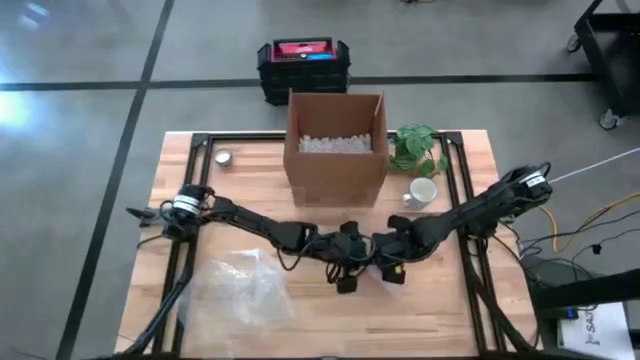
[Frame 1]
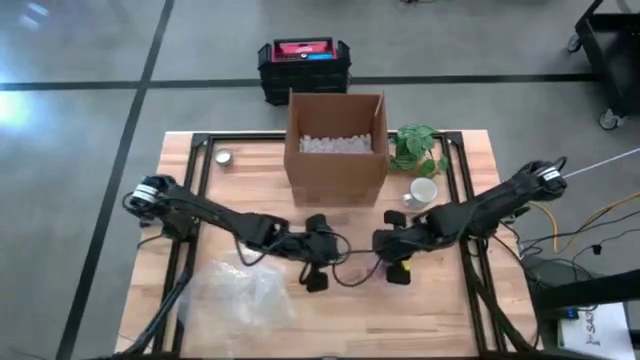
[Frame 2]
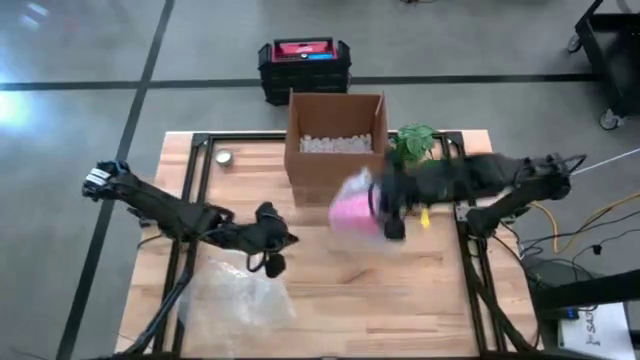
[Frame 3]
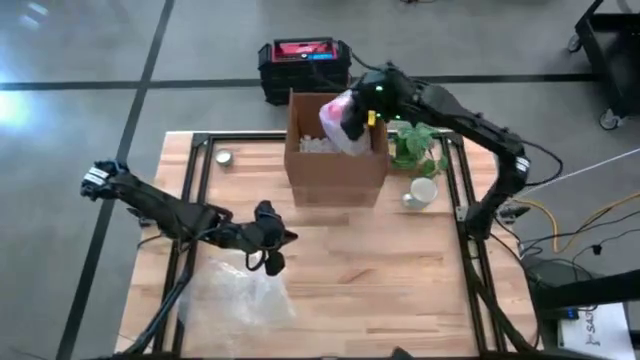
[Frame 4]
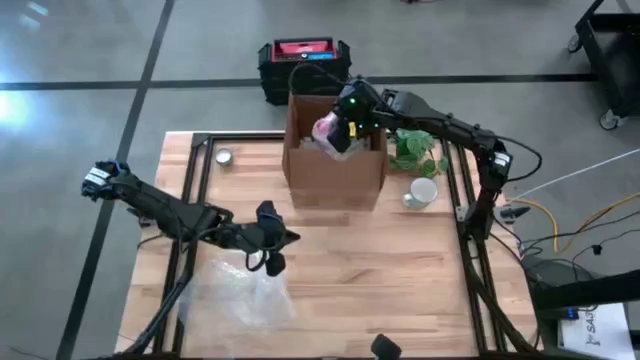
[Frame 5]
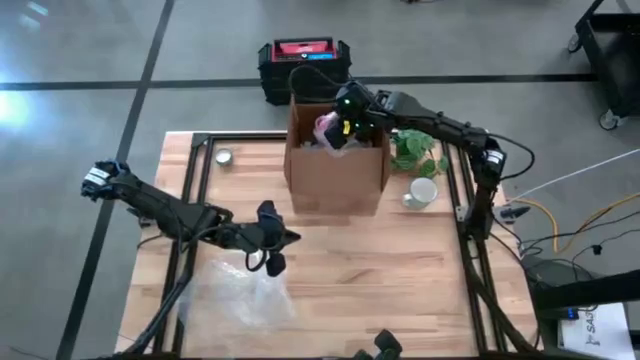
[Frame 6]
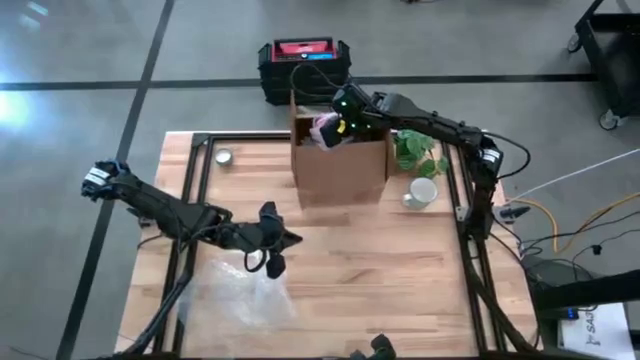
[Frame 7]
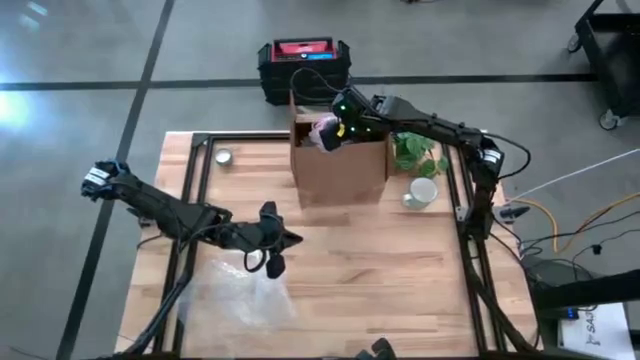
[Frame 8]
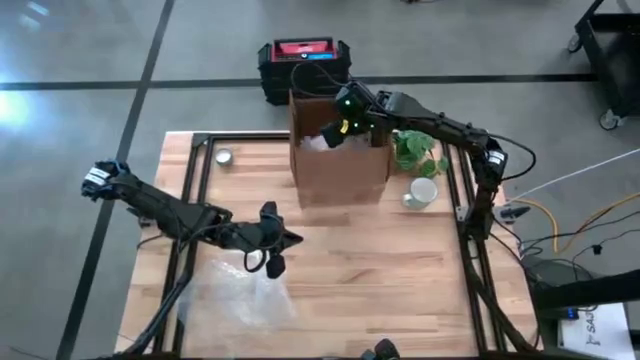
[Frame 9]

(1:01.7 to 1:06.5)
Task: wrap mug
Put the wrapped orange mug into the brown cardboard box

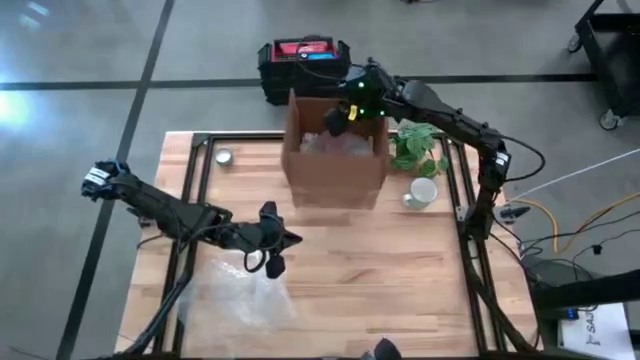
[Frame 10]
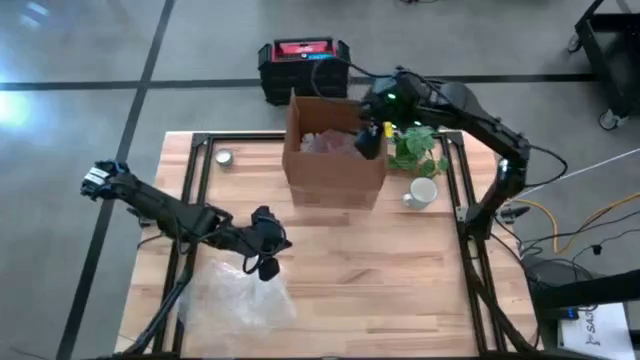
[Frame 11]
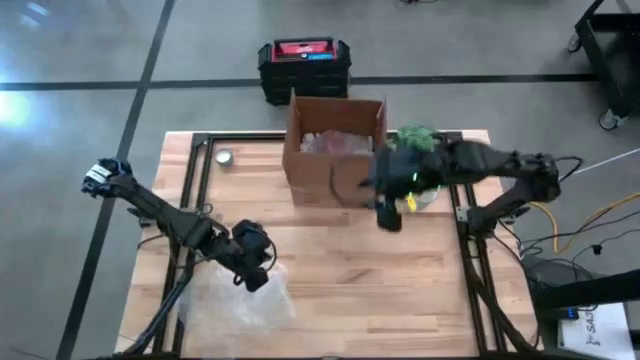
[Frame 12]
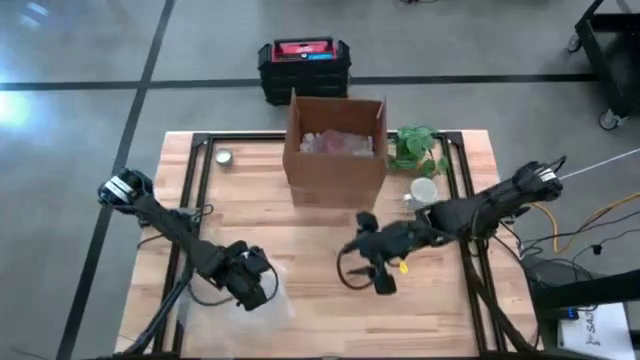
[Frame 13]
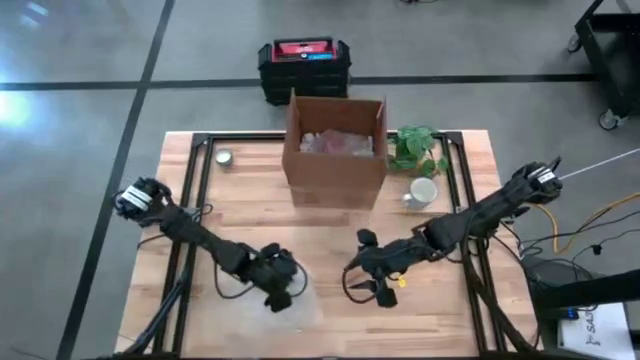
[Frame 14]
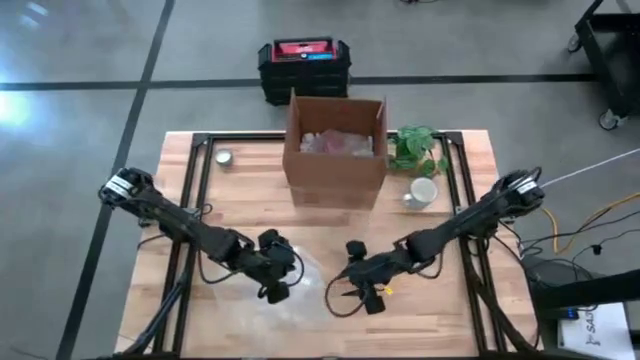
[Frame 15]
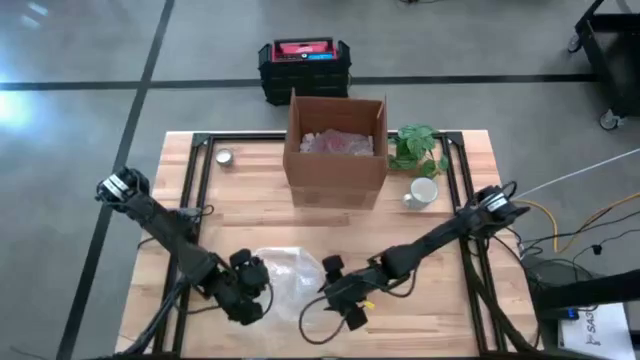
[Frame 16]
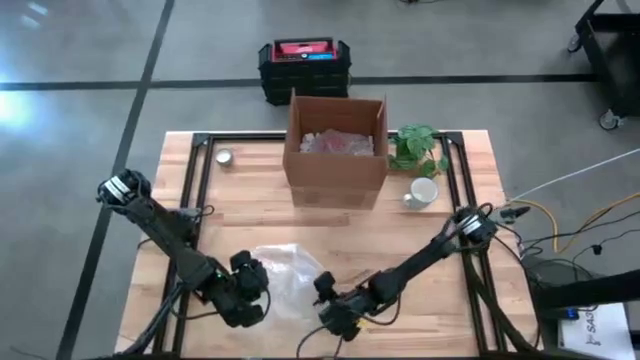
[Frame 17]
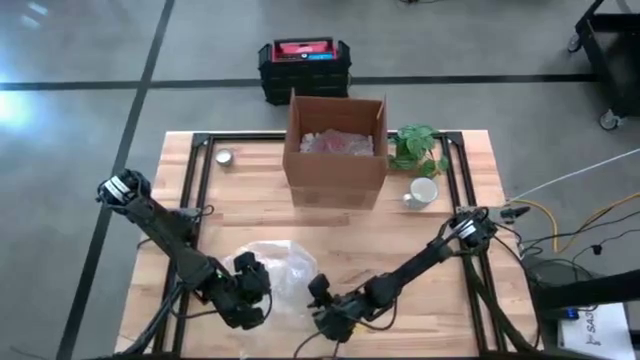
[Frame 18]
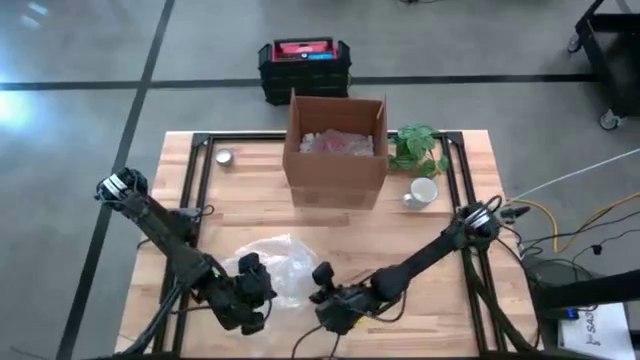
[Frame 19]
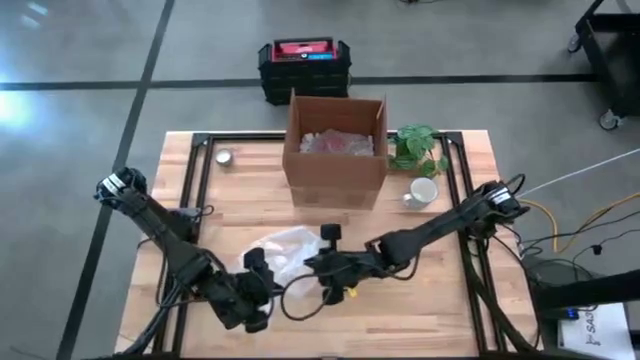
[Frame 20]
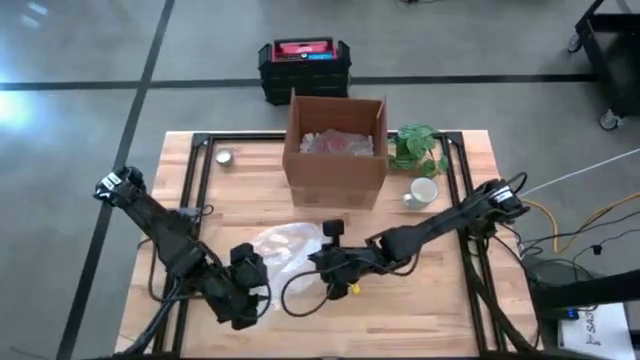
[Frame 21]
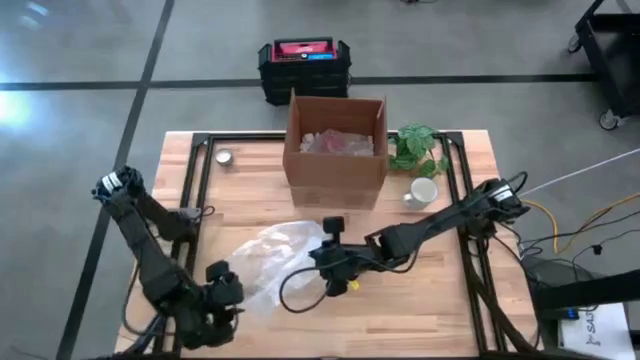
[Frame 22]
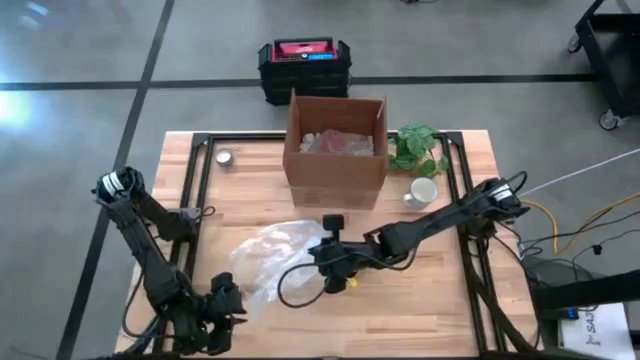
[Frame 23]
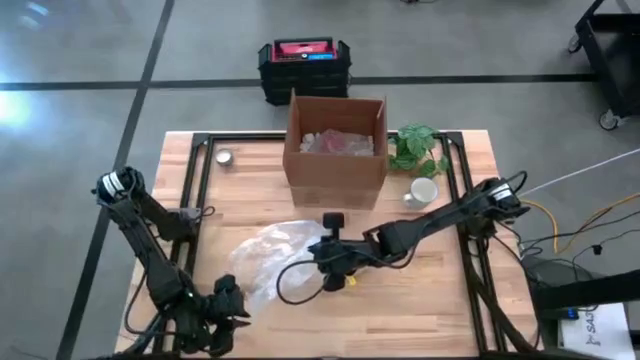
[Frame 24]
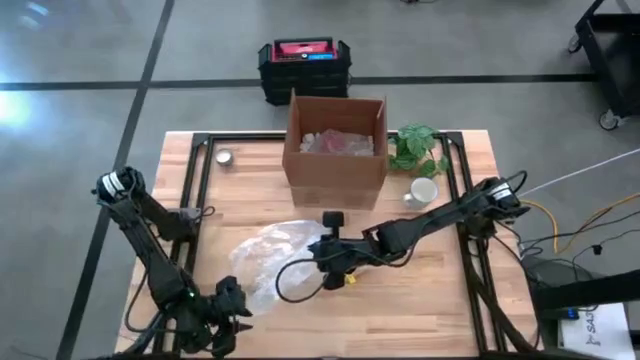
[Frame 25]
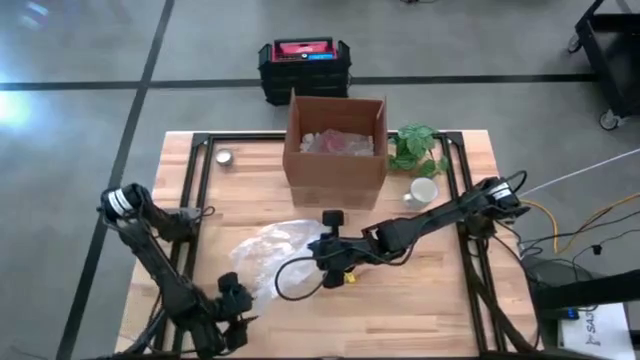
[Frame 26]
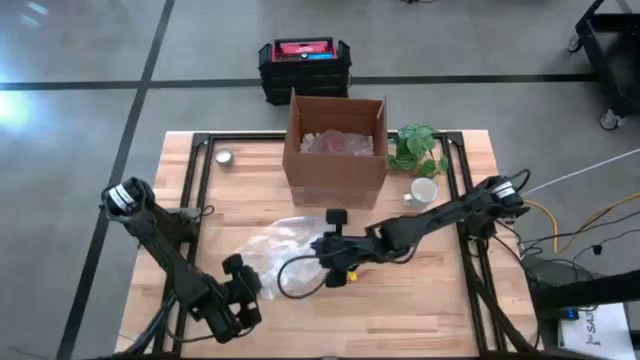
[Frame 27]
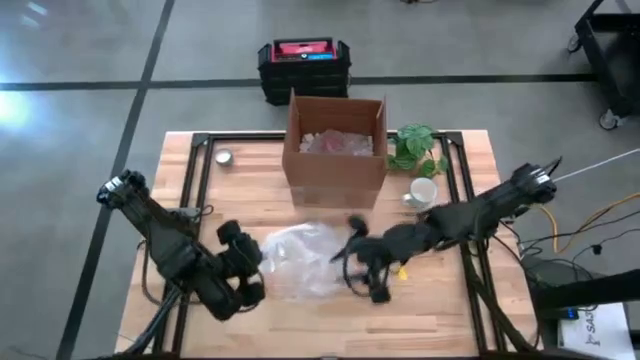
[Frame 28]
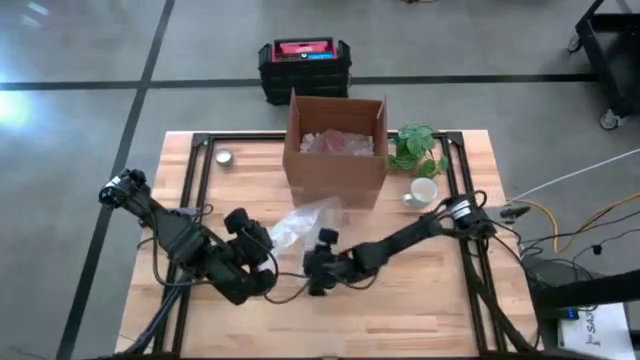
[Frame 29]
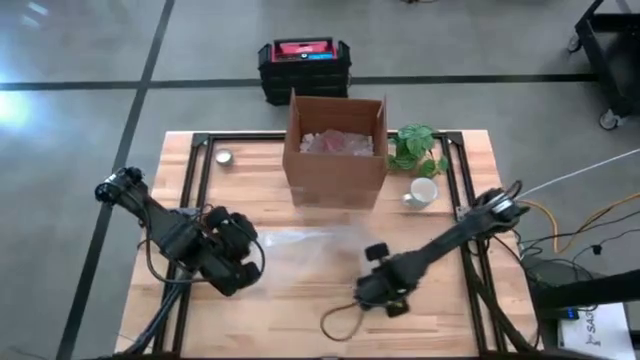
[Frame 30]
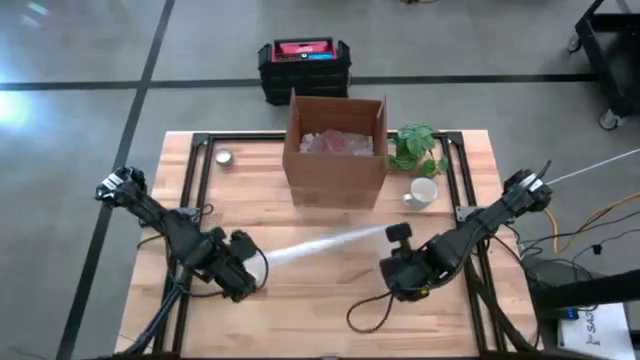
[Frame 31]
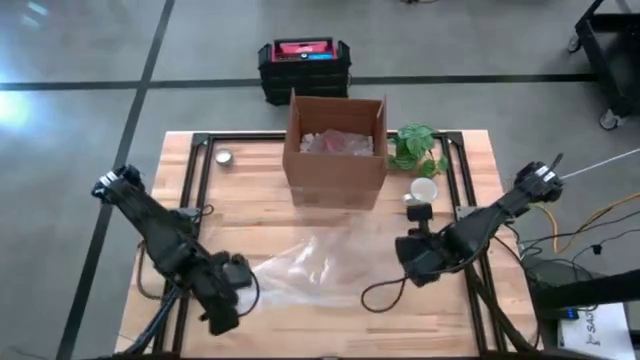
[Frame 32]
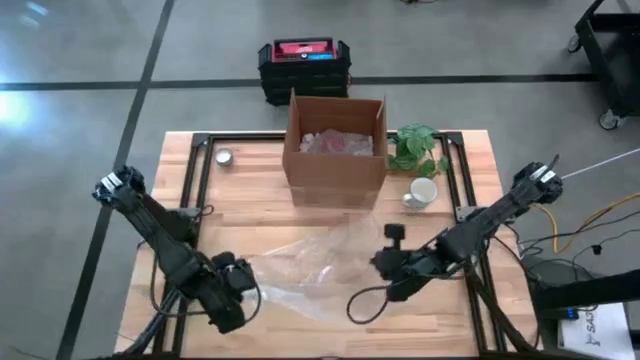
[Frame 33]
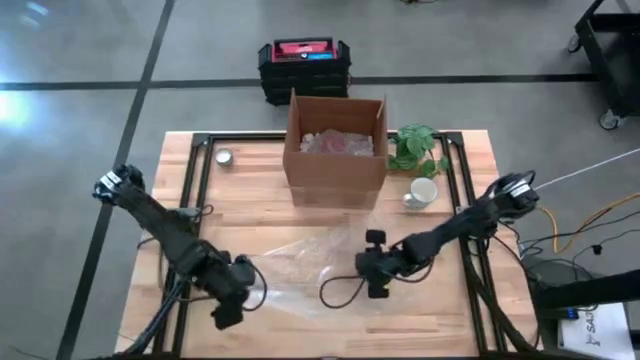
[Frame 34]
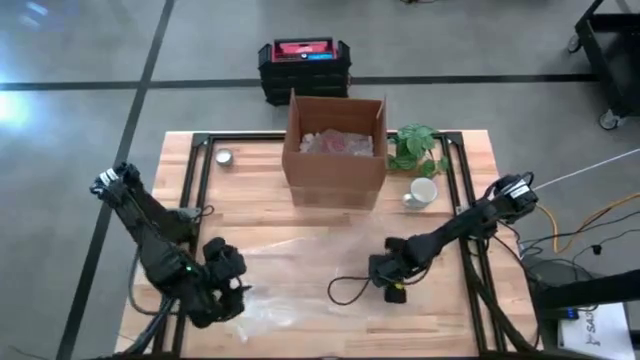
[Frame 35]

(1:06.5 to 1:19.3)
Prepare the transparent bubble wrap
